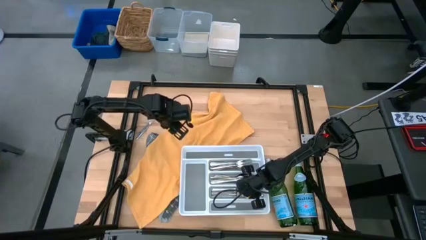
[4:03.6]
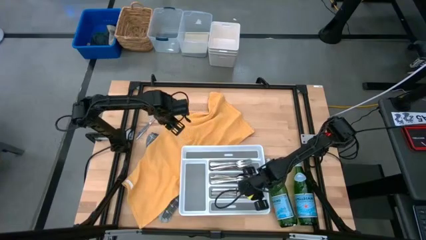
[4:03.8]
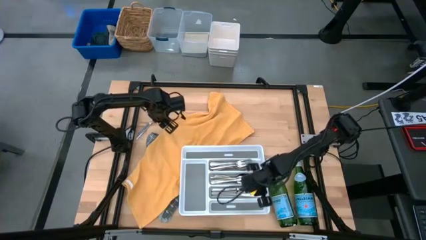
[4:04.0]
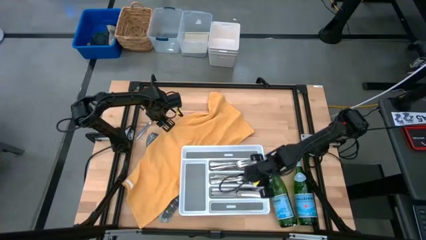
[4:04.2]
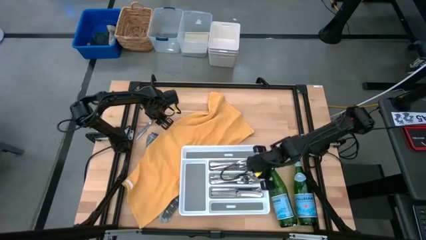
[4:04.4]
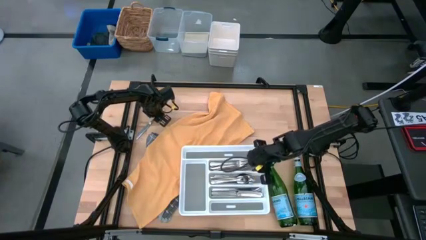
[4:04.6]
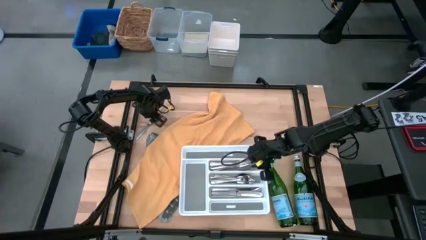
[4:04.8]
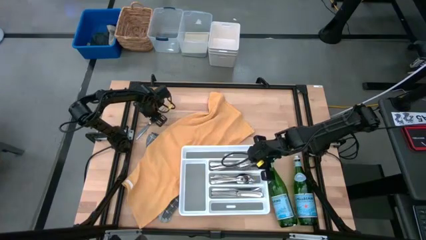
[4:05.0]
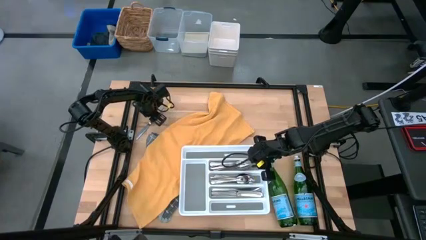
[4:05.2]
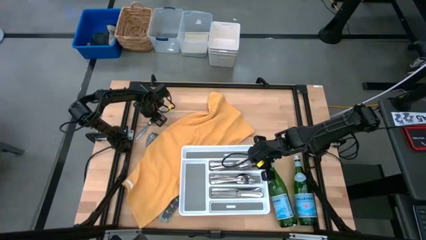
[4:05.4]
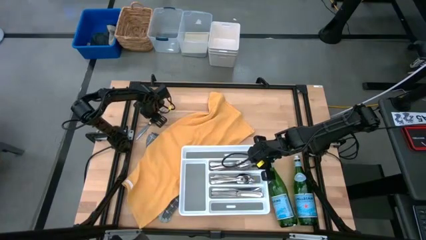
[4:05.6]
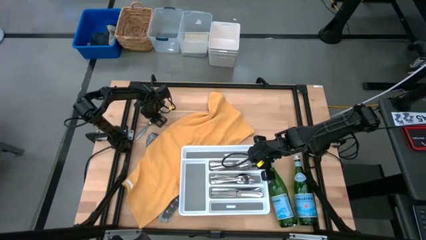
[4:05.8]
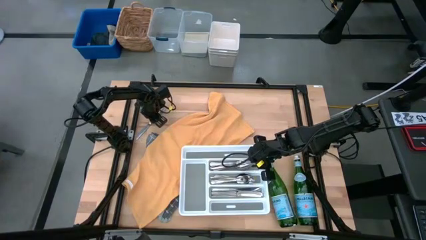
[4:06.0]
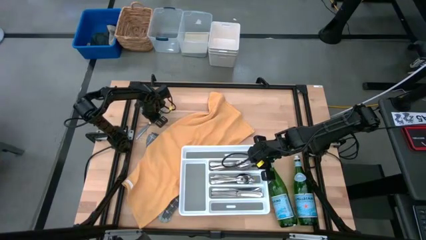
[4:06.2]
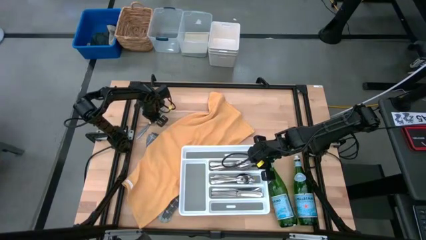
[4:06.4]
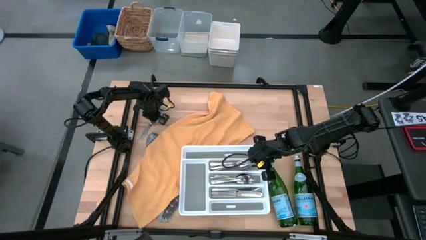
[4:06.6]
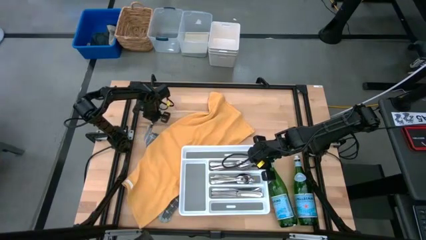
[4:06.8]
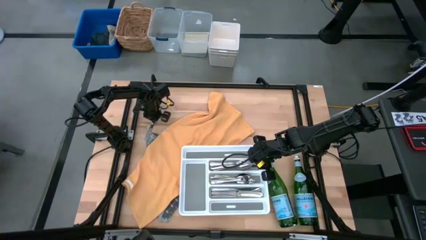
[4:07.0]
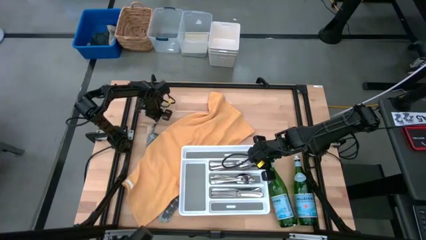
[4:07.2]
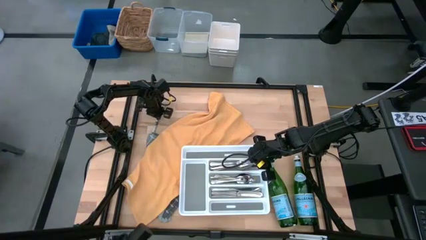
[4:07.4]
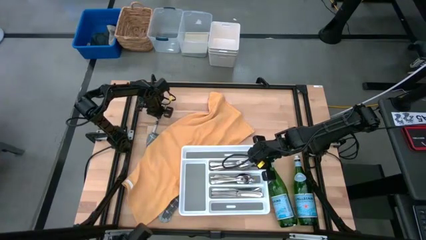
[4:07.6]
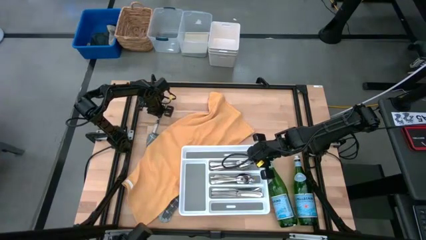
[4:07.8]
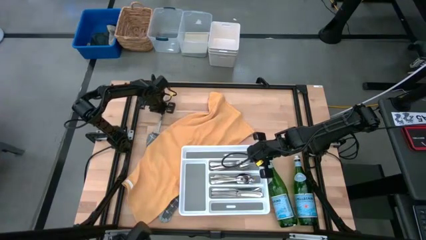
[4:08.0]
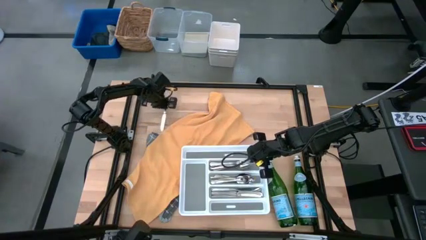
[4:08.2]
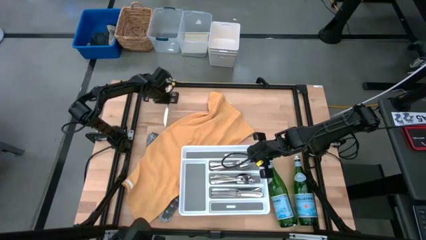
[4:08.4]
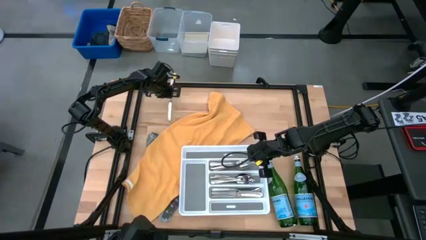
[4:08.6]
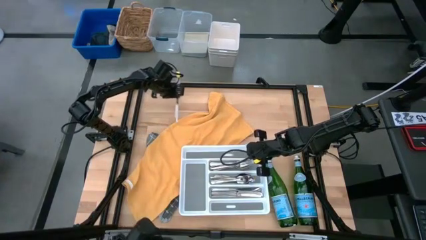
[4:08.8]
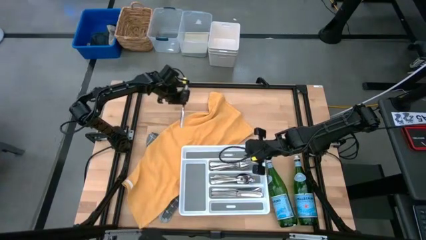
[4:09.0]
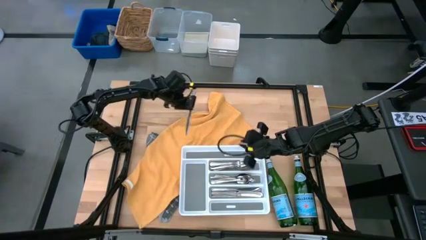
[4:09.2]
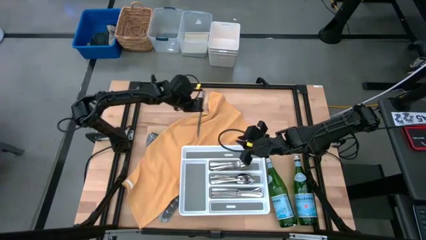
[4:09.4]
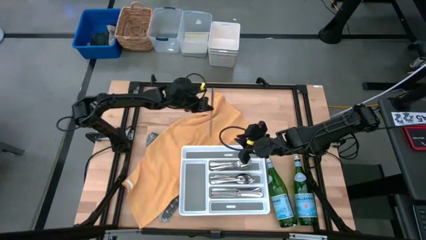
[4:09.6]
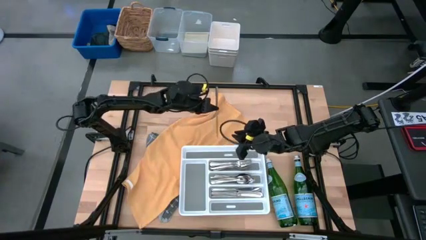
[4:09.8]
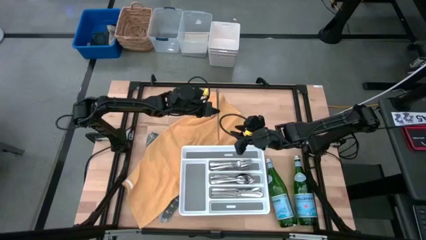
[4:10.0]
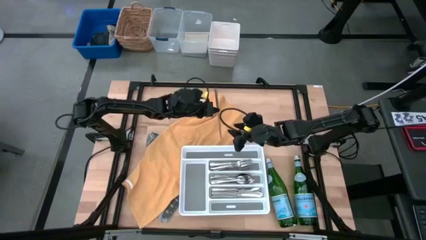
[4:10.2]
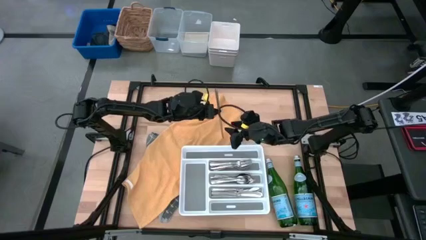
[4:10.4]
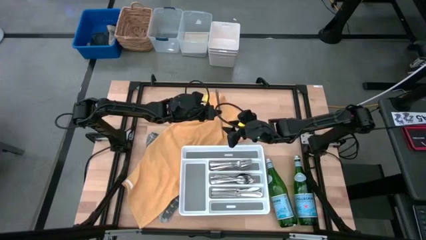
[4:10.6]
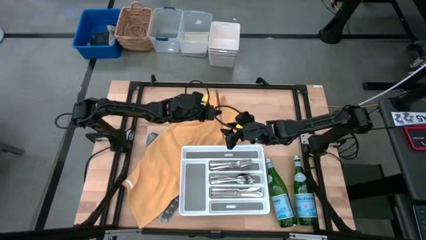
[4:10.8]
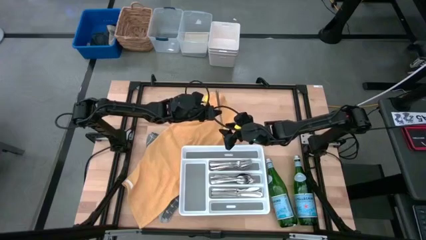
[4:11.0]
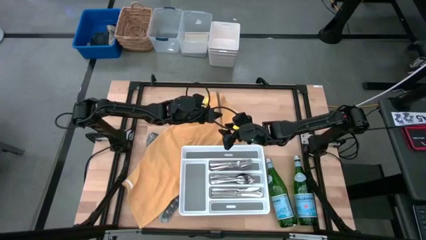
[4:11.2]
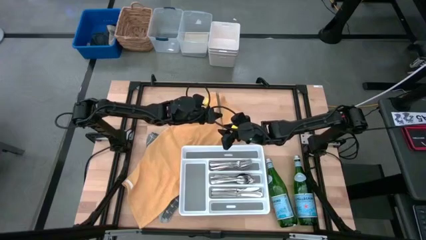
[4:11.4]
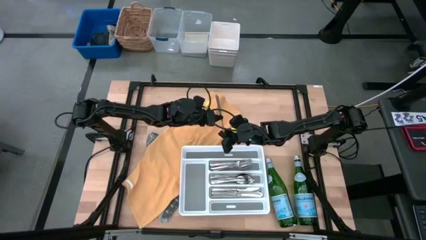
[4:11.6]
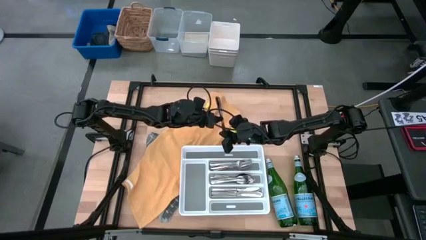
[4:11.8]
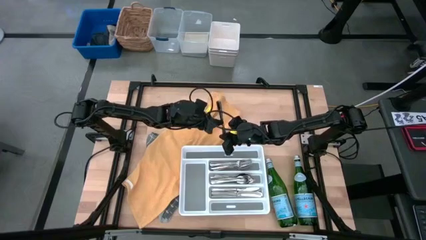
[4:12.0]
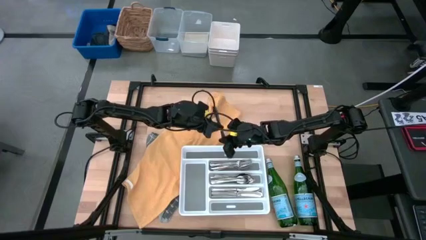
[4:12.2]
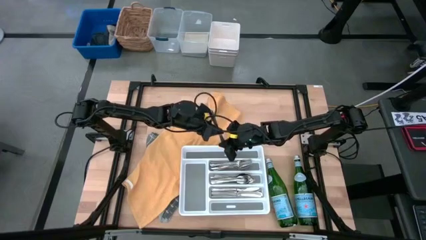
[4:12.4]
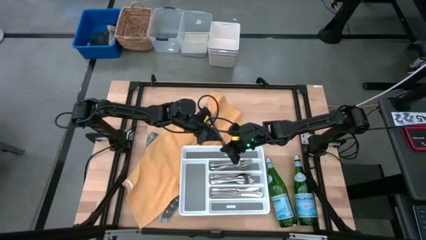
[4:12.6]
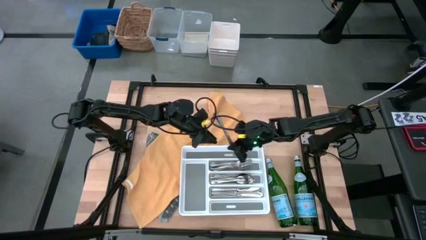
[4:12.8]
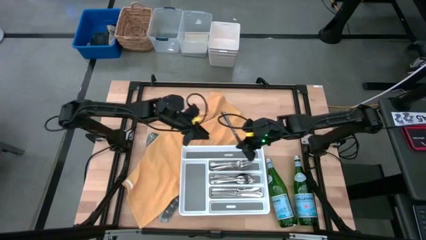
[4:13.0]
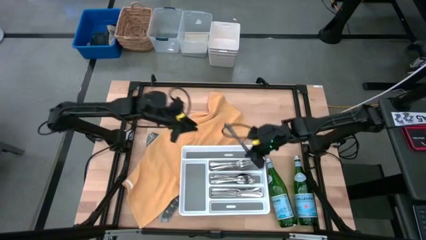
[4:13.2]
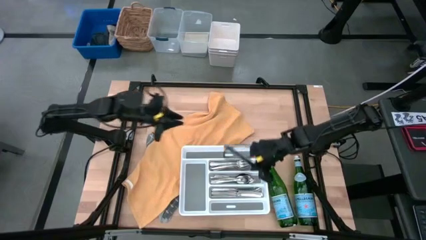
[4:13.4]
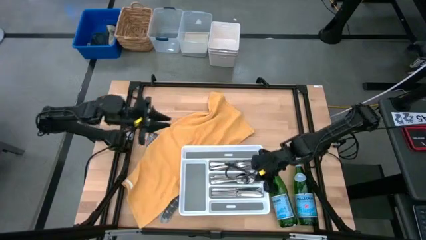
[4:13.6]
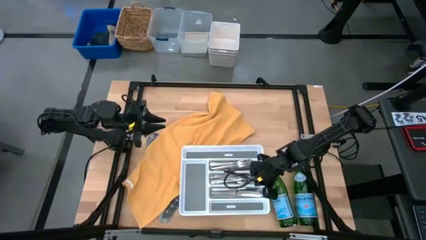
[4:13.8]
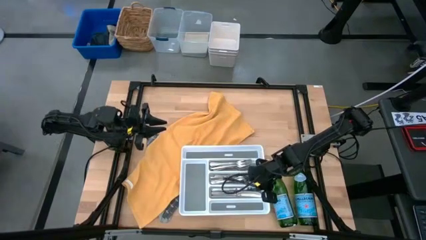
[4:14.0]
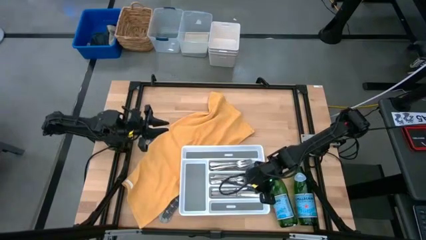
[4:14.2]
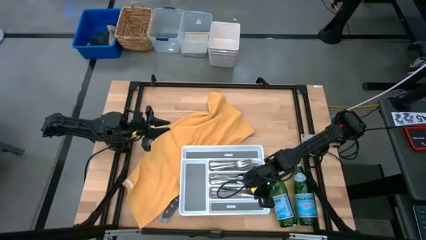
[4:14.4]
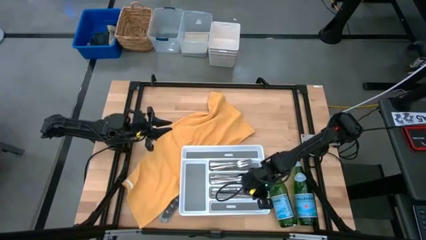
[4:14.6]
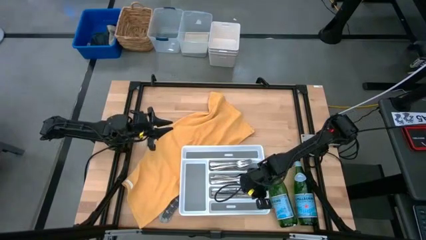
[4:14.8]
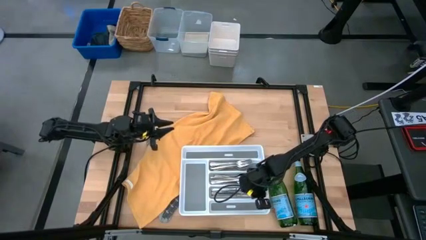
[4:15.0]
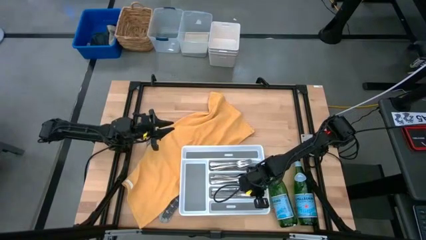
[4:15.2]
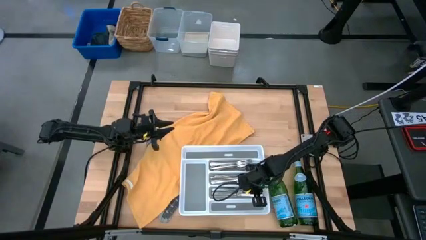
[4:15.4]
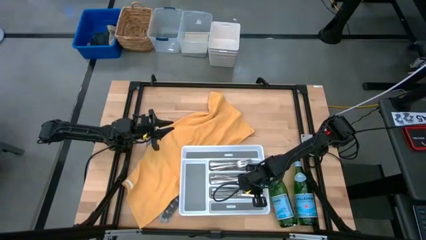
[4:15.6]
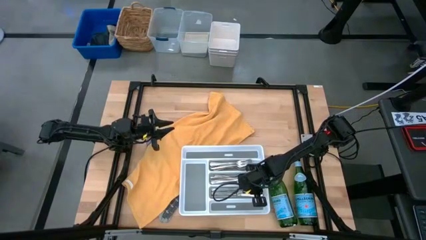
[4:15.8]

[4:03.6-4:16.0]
Task: Sort silverware
Put the silver table knife into the white silverware tray

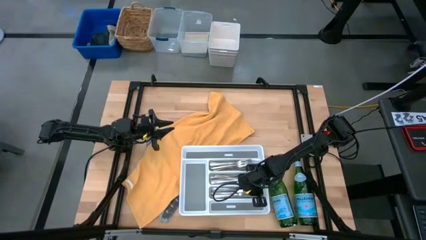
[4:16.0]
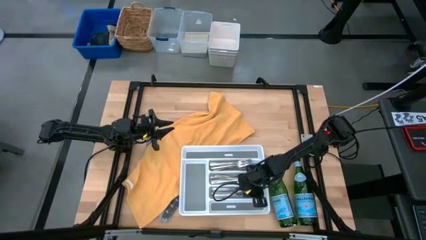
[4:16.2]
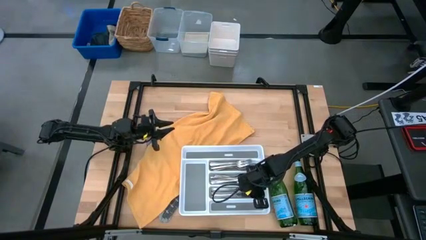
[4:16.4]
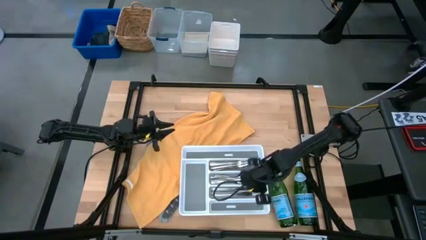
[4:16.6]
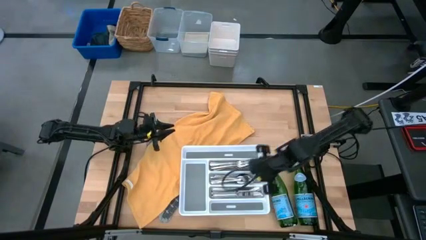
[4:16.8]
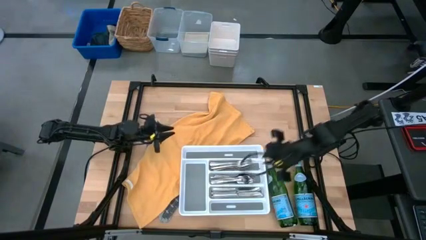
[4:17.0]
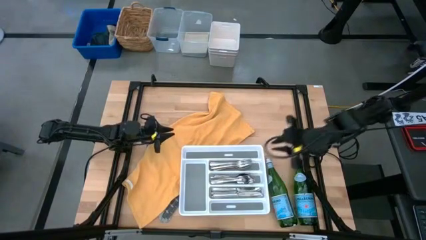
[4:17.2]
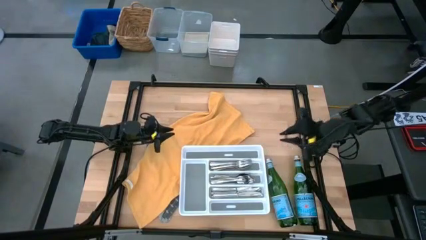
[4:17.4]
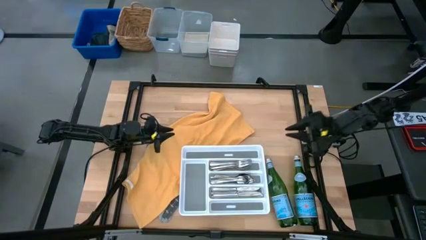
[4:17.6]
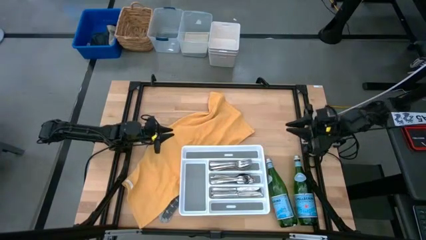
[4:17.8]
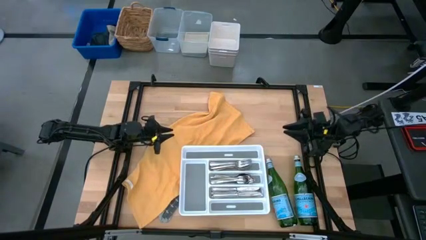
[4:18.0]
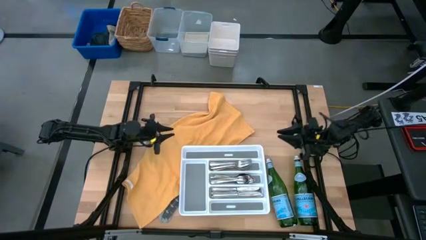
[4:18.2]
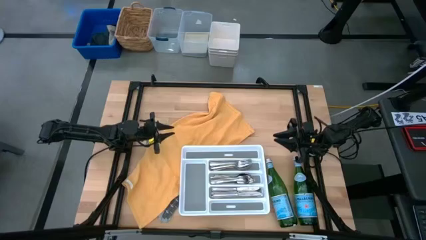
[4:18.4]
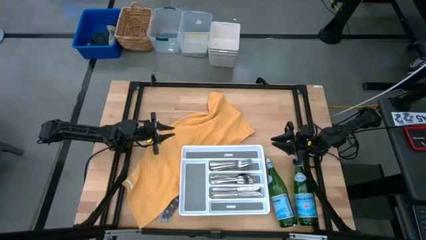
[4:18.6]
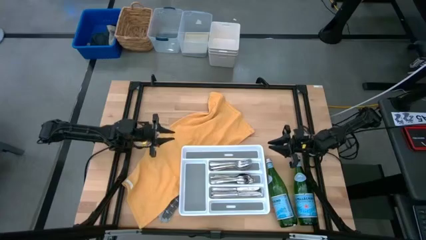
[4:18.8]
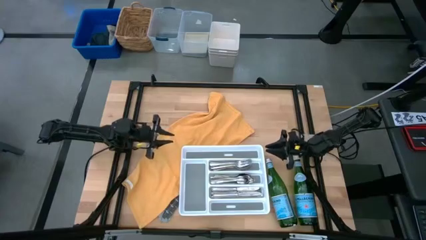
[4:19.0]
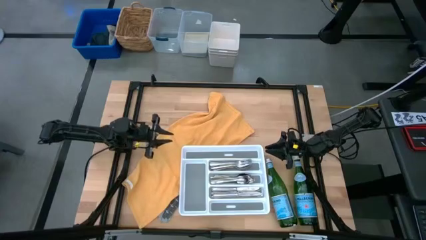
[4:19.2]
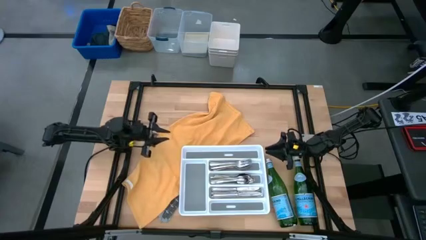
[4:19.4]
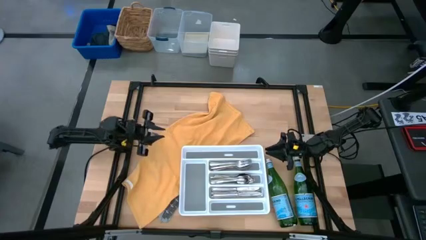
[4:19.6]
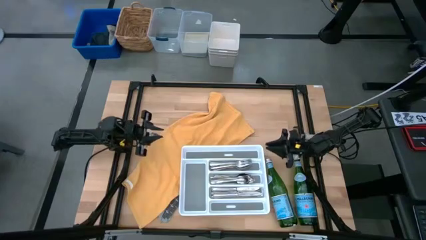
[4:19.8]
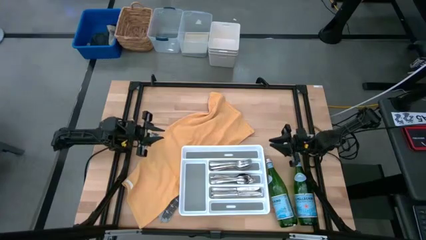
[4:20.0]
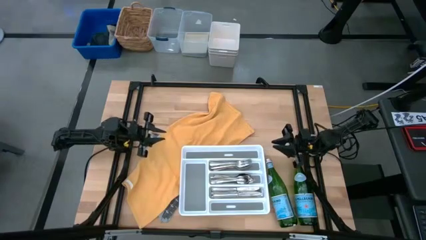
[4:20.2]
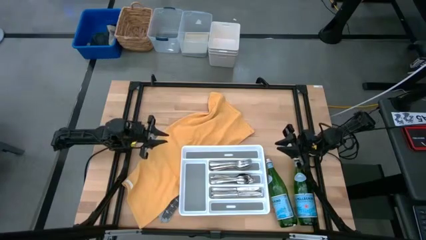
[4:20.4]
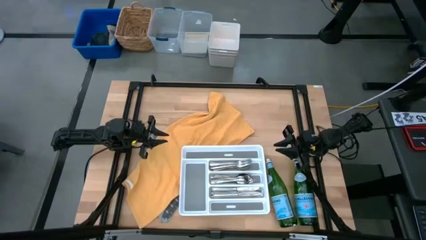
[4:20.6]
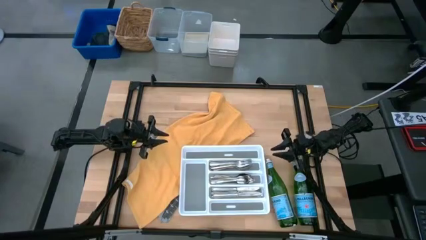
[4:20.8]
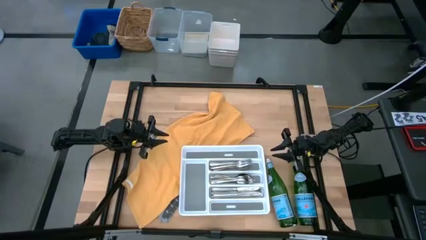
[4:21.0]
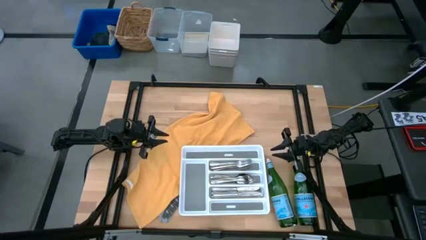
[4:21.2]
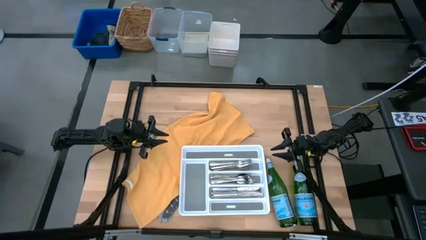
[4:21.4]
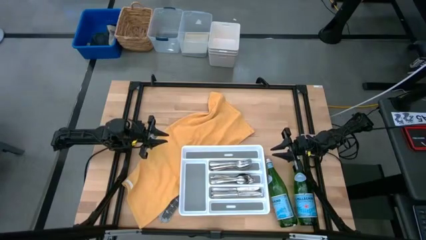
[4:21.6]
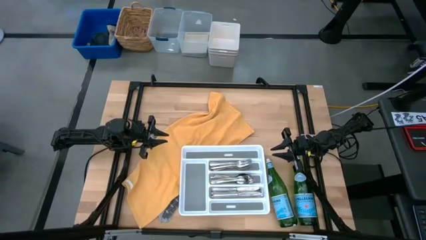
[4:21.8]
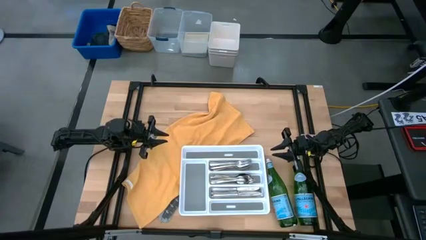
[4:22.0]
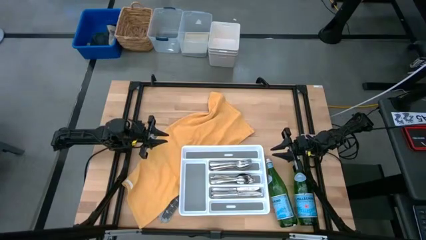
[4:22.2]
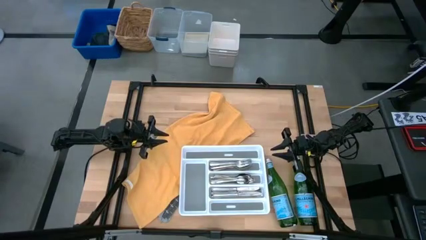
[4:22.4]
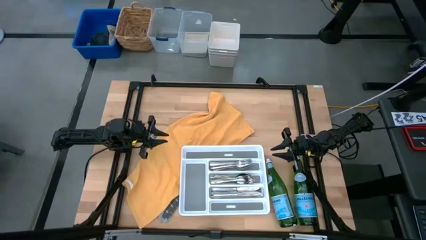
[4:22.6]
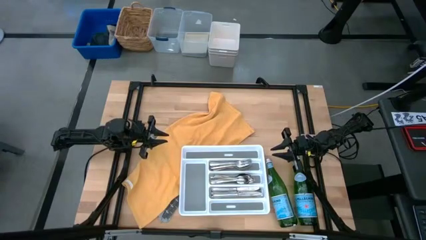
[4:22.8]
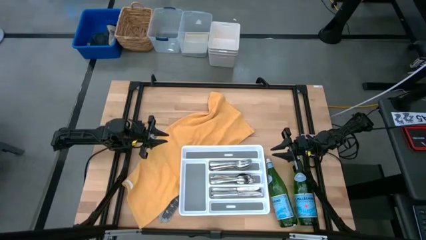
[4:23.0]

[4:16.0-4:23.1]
Return to Home Position
